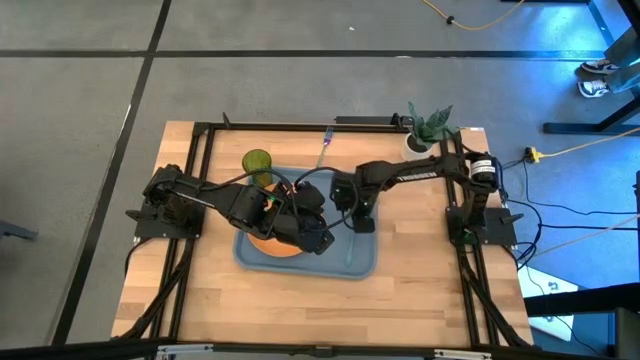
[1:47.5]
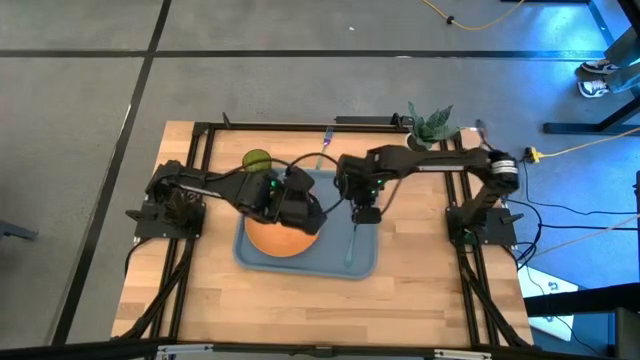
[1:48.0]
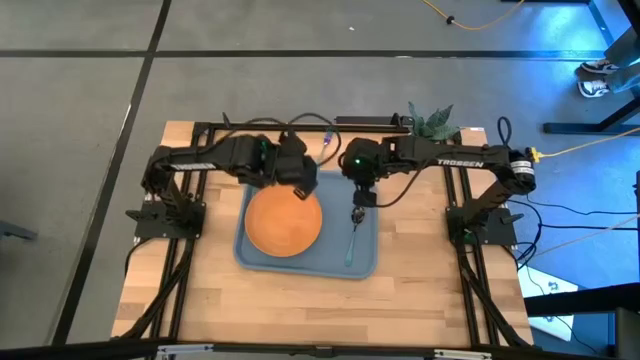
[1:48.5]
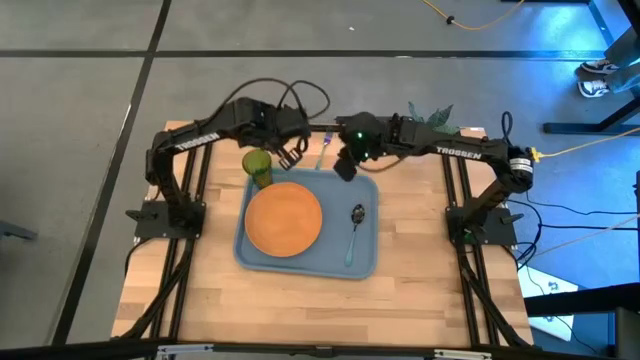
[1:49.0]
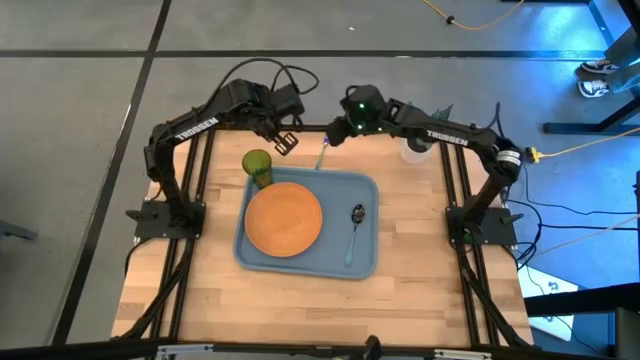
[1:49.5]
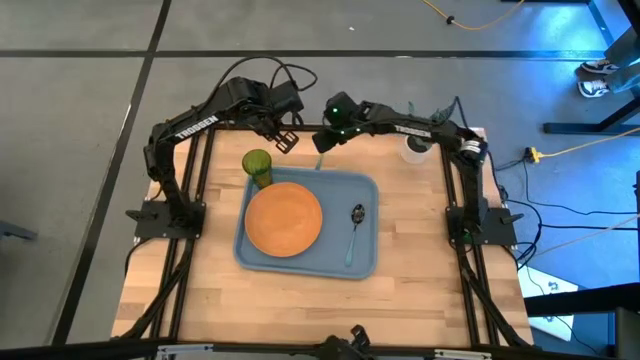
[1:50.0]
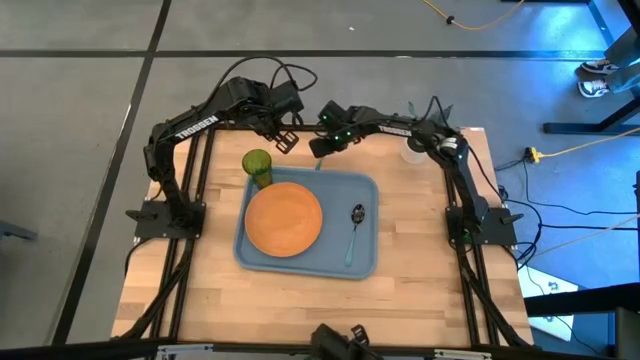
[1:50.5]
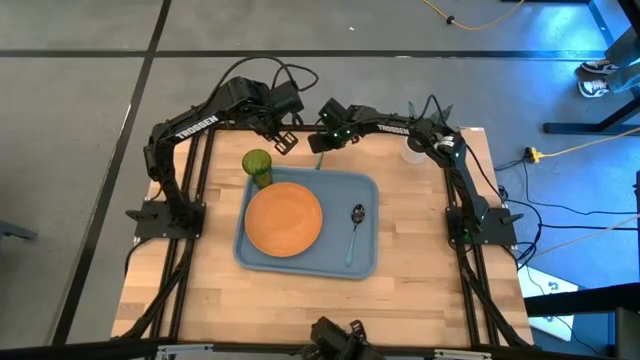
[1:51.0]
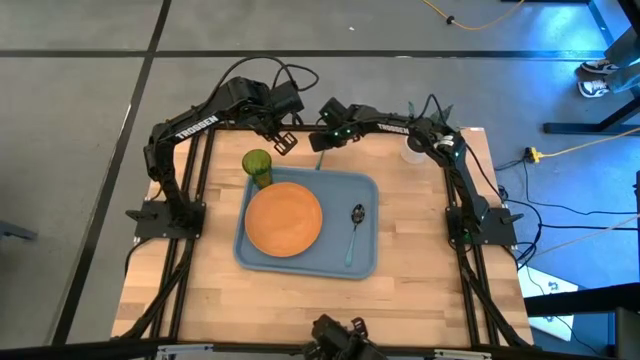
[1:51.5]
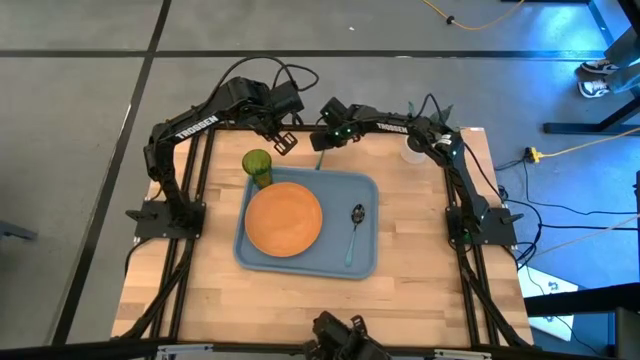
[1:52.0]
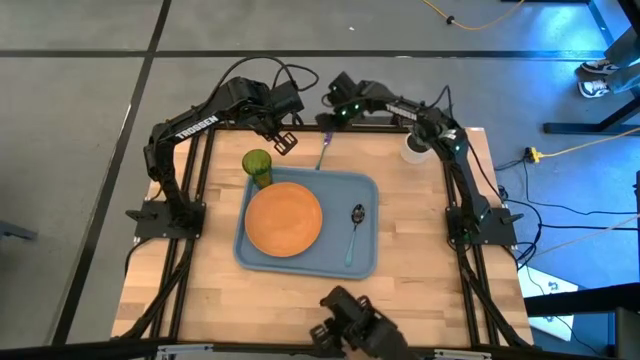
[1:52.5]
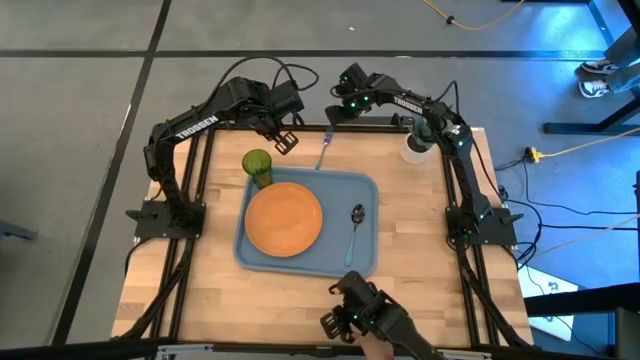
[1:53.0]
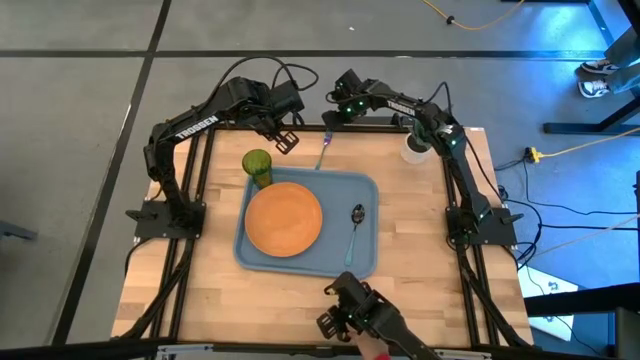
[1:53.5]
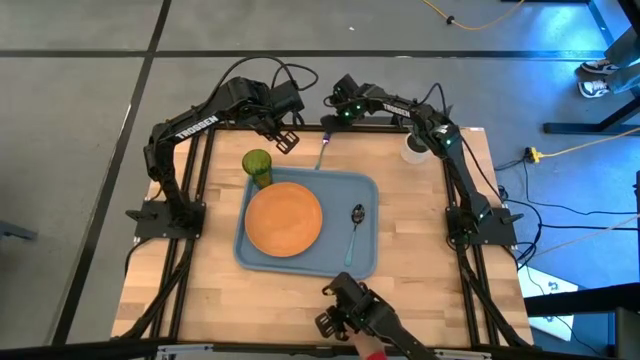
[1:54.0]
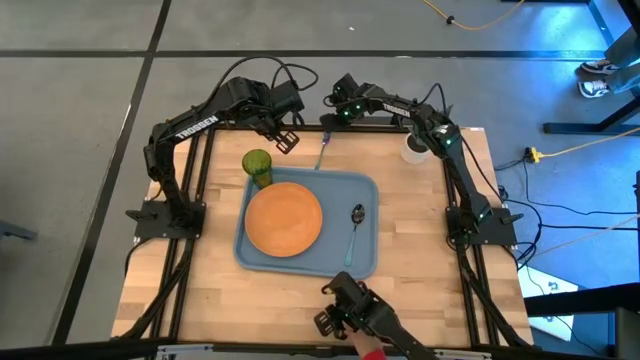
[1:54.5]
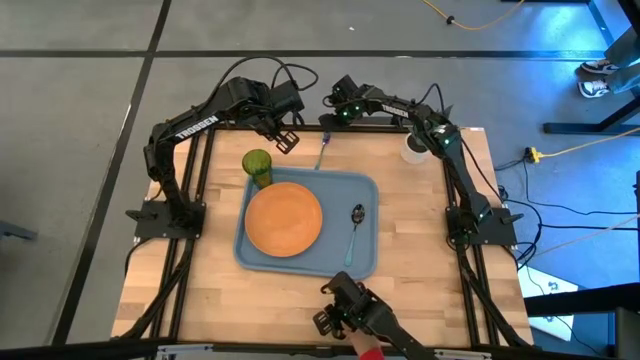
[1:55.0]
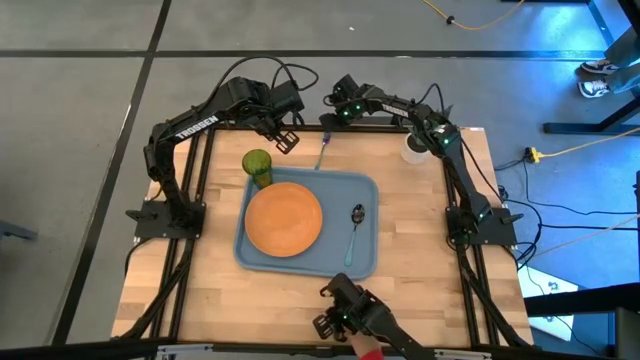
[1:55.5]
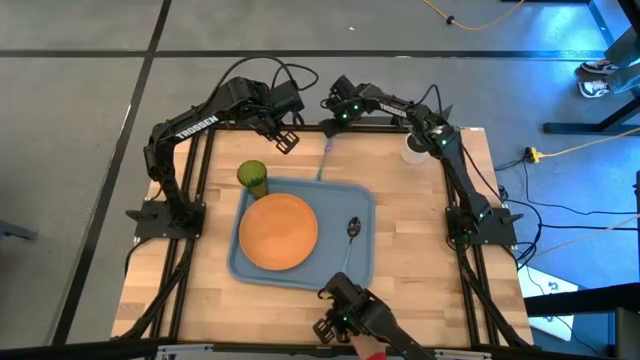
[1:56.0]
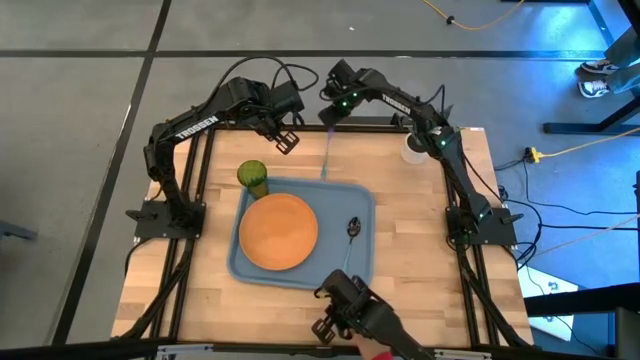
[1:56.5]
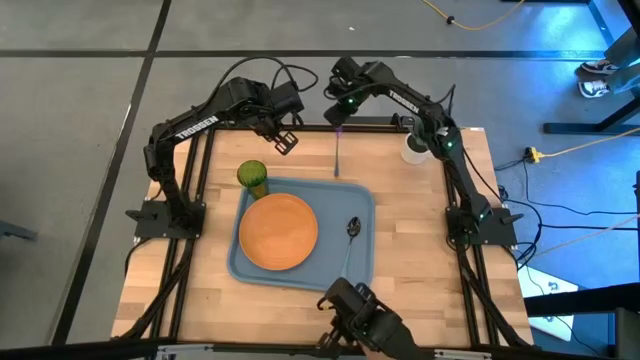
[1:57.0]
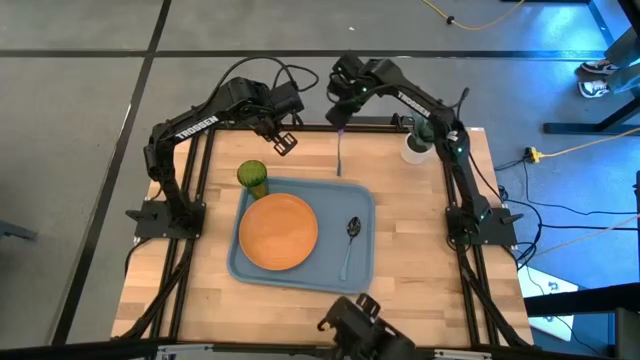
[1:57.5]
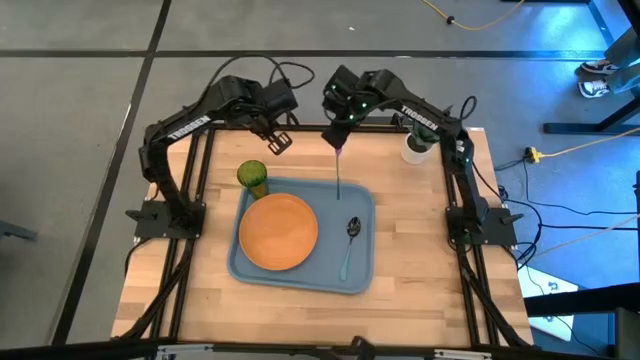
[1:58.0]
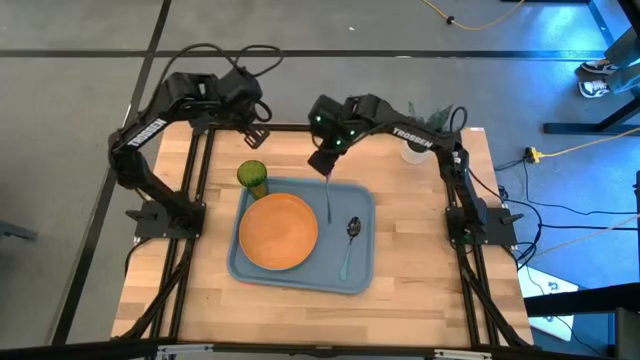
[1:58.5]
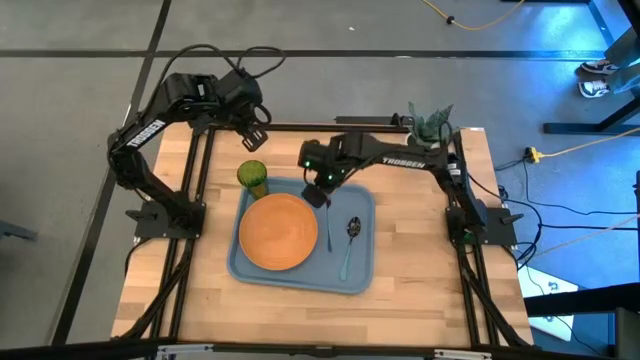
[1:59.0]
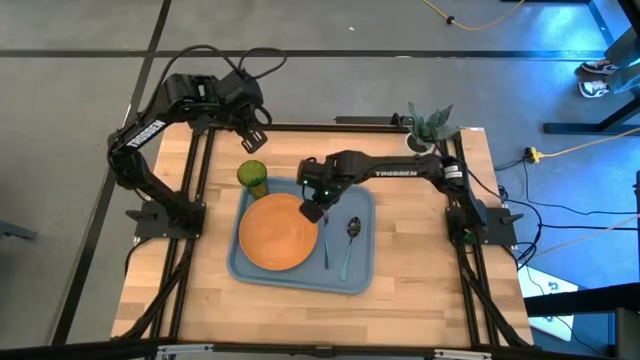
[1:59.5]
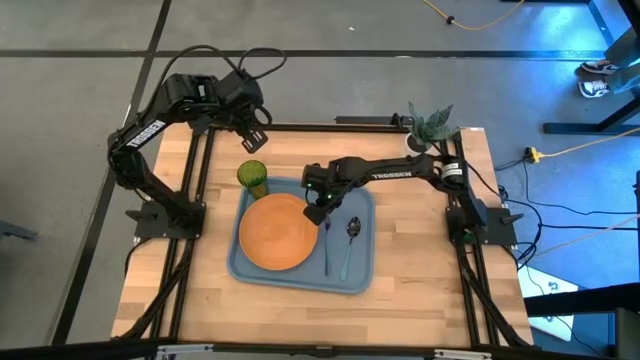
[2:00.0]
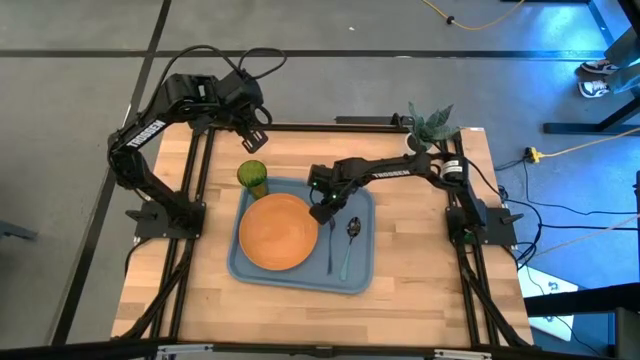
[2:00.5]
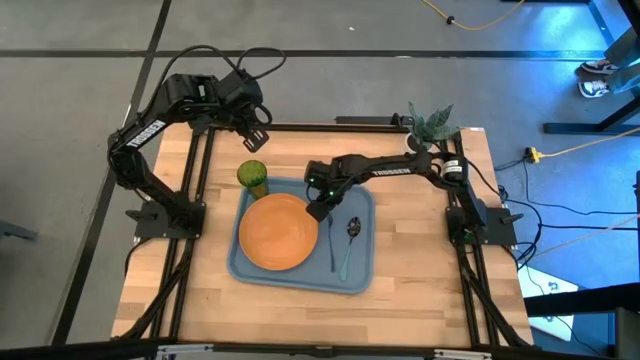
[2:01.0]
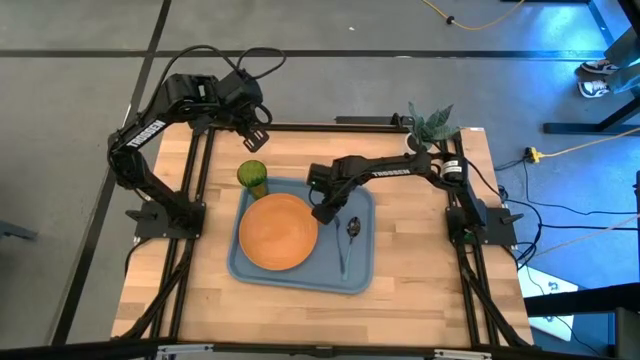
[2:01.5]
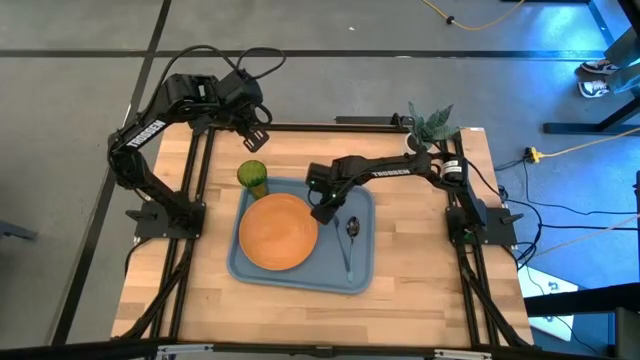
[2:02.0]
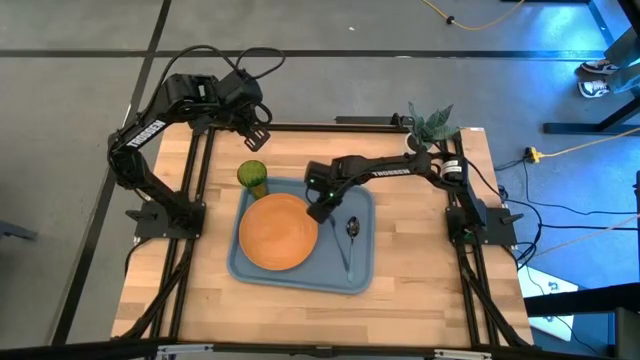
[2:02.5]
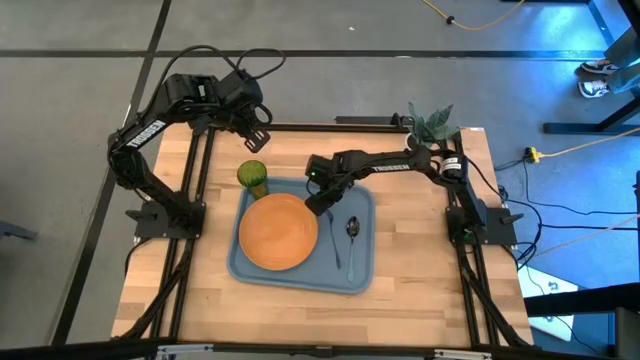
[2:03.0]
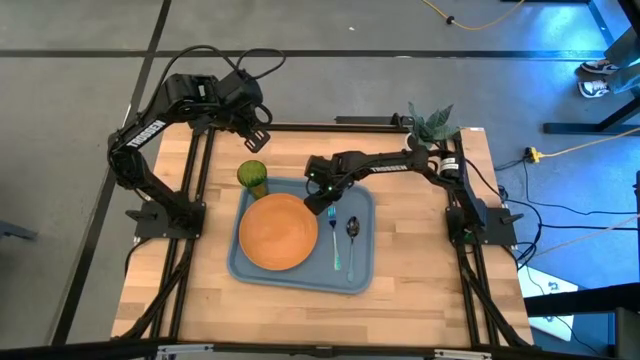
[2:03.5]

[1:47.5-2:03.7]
Task: Pick and place plate/cup/fork/spoon on tray
Put the blue fork on the blue tray between the orange plate and blue spoon

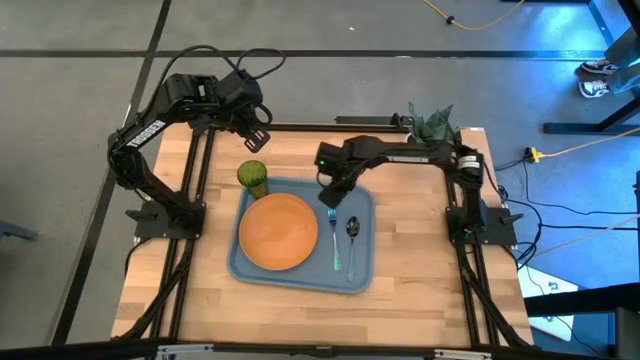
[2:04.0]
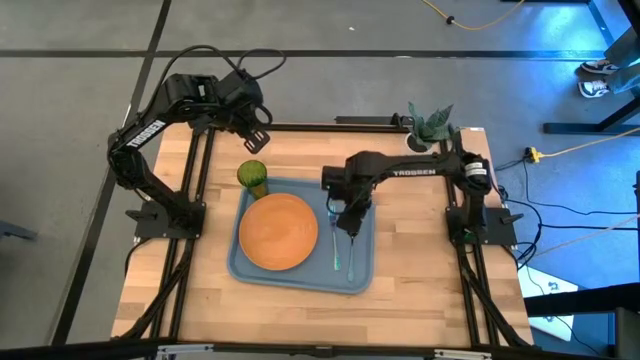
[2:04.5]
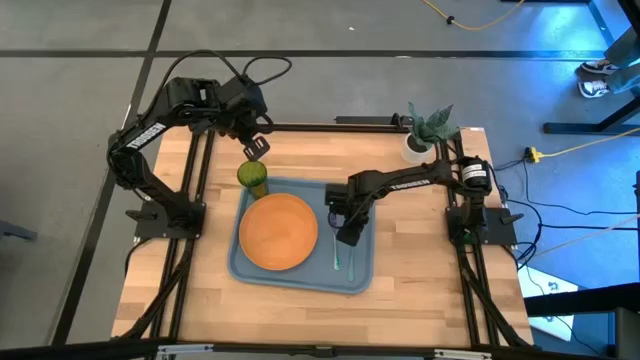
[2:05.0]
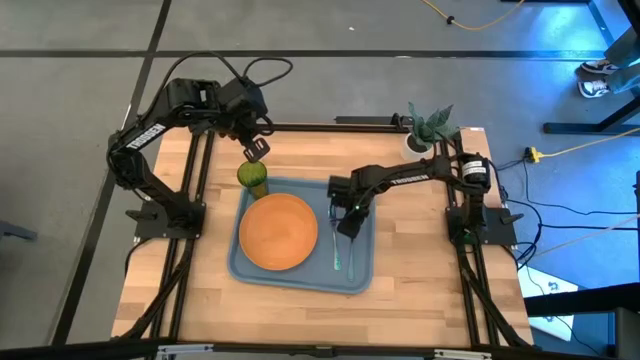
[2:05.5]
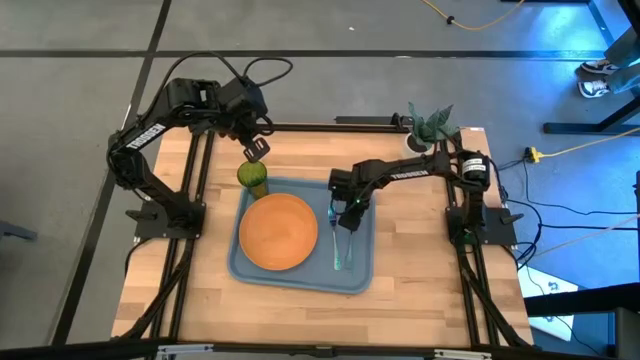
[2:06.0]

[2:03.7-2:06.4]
Adjust the blue spoon on the blue tray

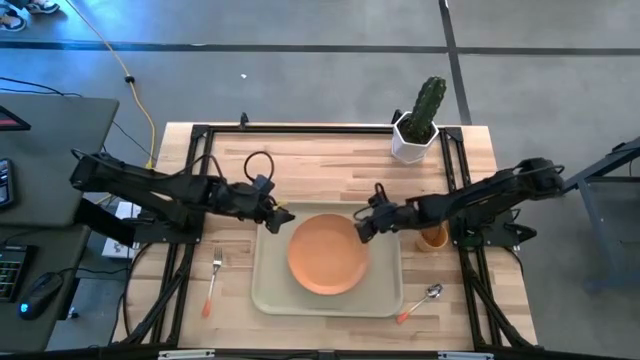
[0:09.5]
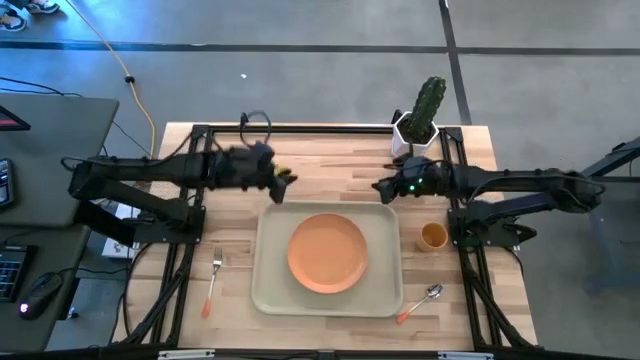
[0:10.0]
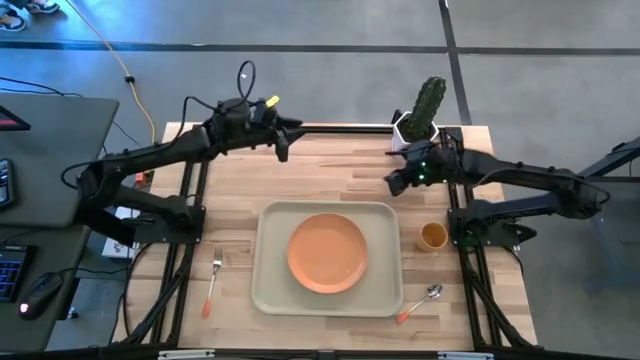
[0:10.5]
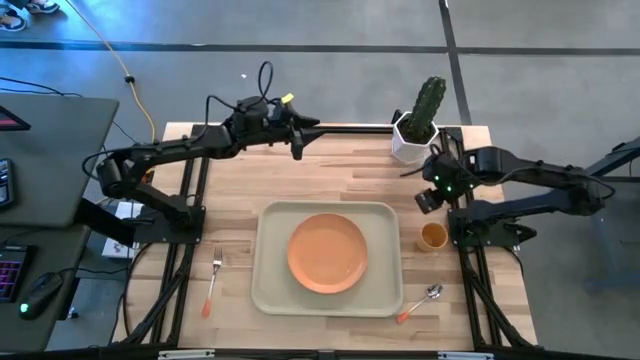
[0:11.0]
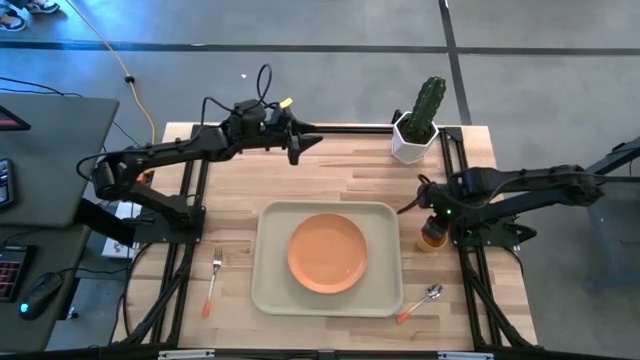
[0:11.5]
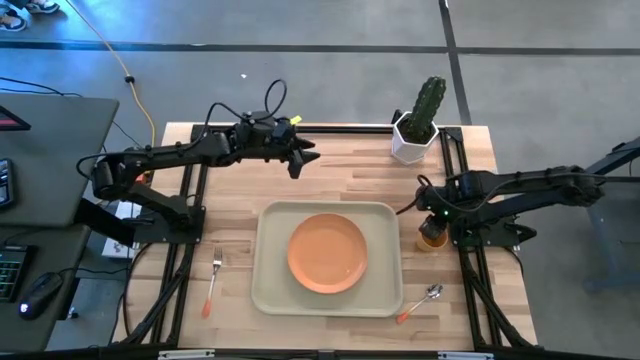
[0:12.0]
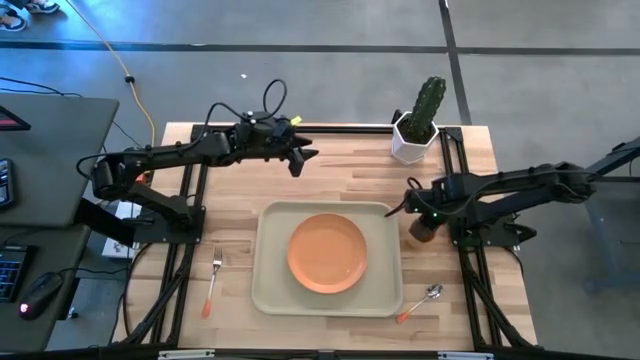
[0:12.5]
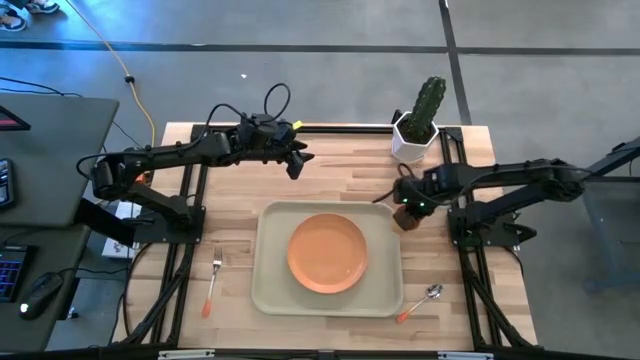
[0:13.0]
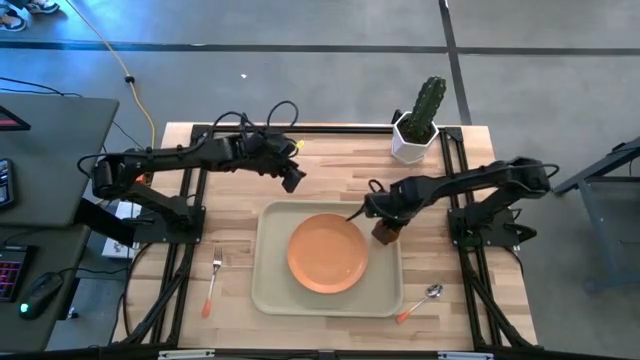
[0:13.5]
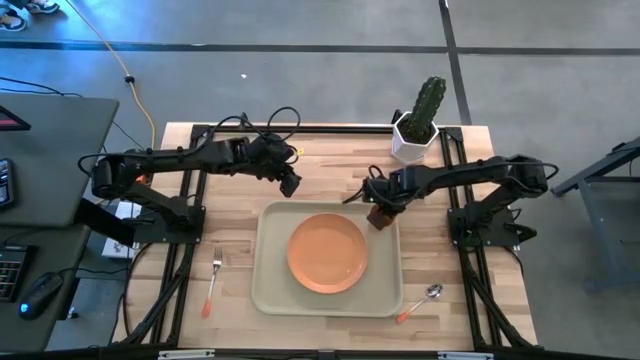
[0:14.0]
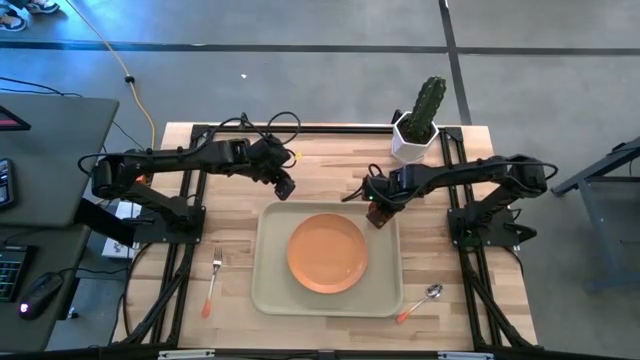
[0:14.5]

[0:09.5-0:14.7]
Task: Pick and place plate/cup/fork/spoon on tray
Put the orange cup at the top right of the orange plate on the gray tray
